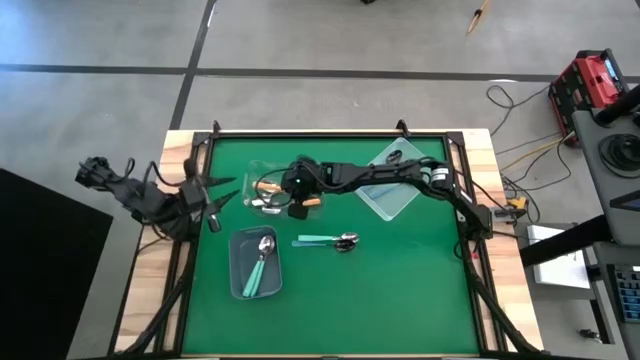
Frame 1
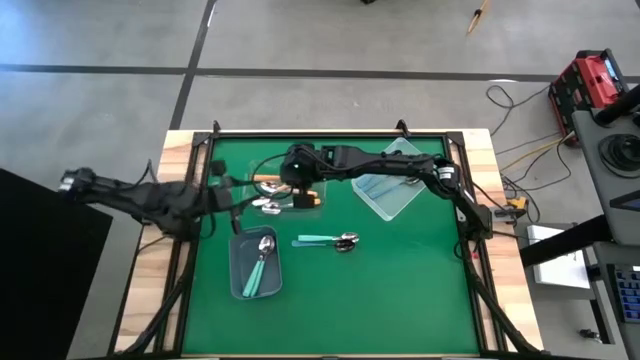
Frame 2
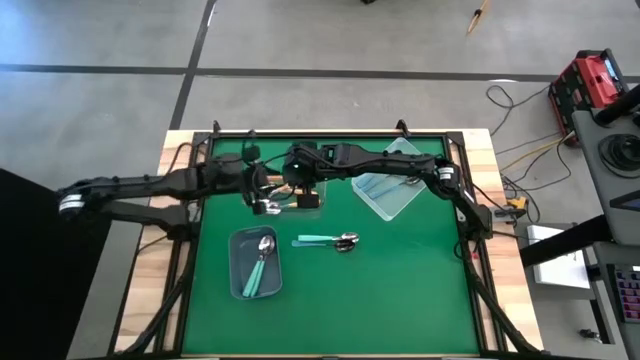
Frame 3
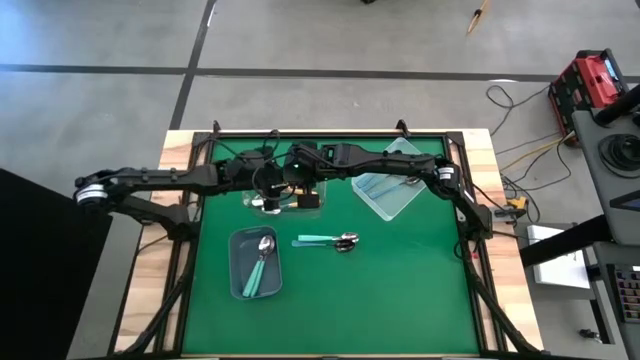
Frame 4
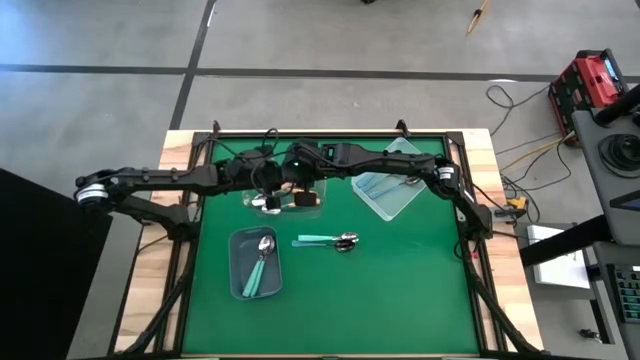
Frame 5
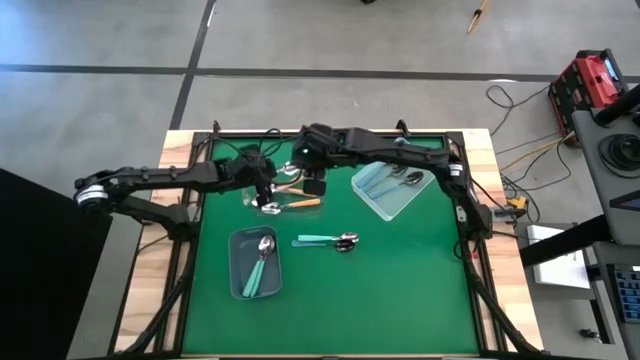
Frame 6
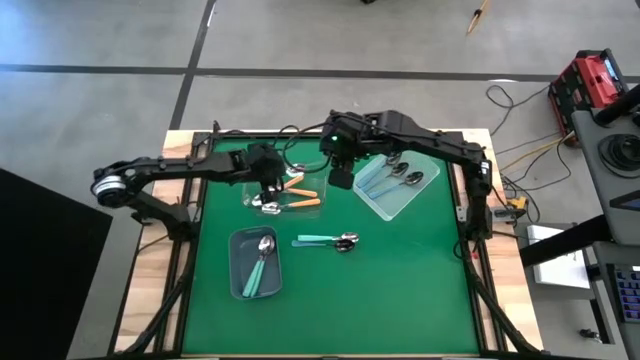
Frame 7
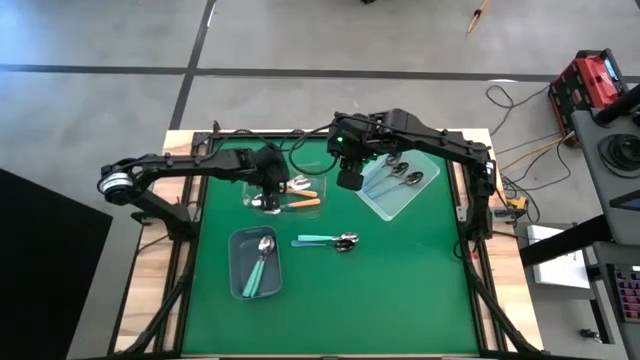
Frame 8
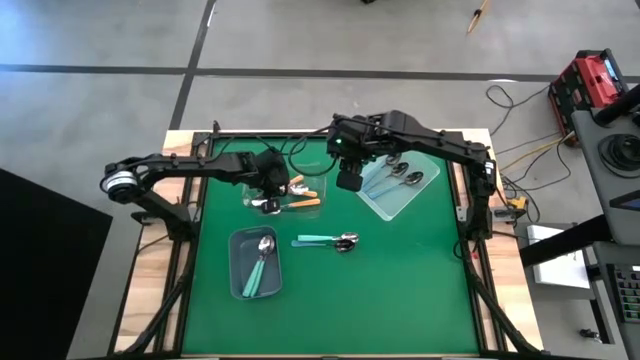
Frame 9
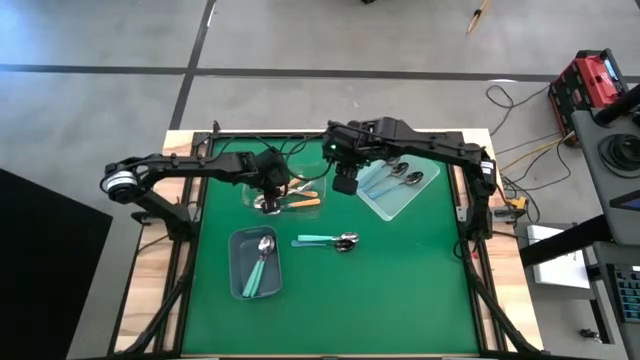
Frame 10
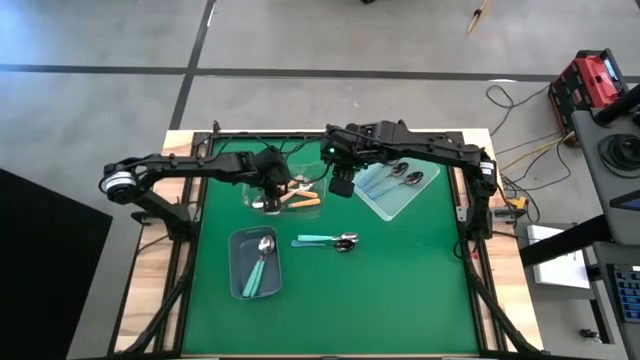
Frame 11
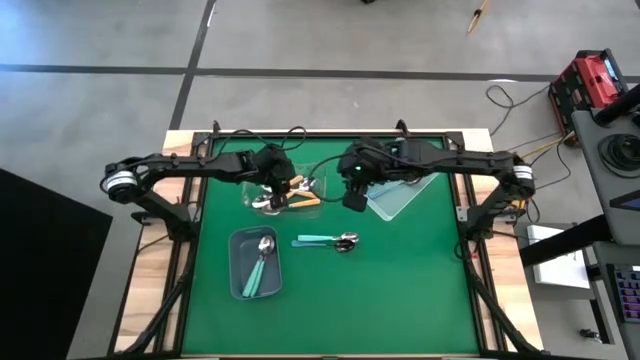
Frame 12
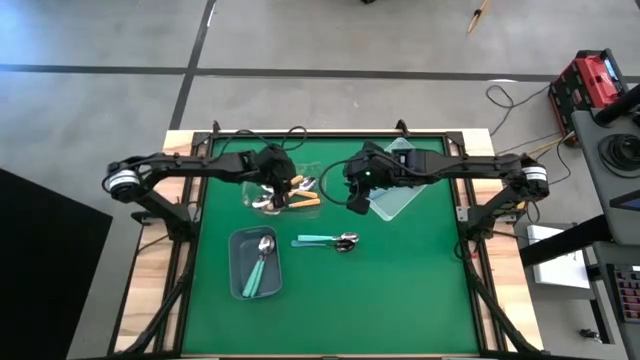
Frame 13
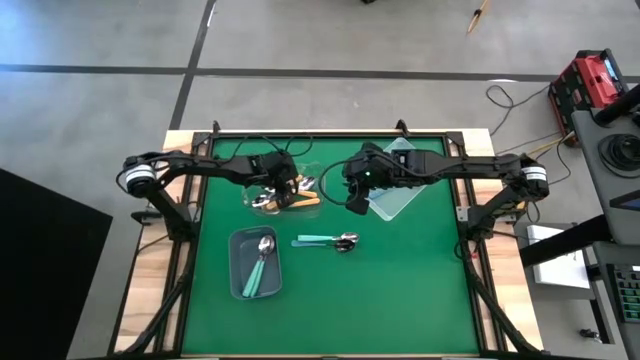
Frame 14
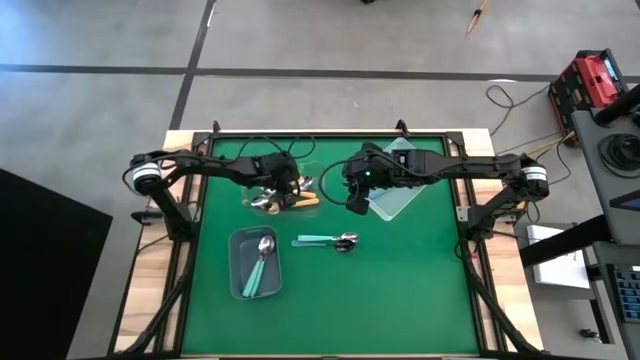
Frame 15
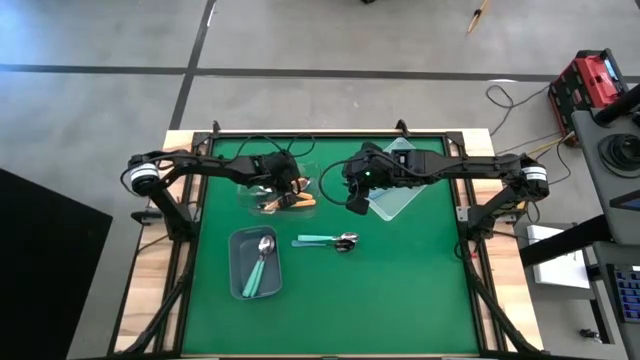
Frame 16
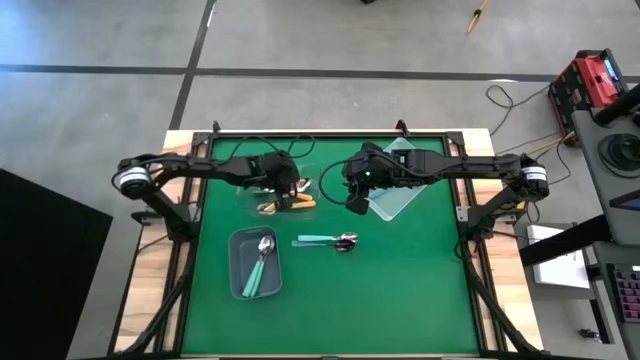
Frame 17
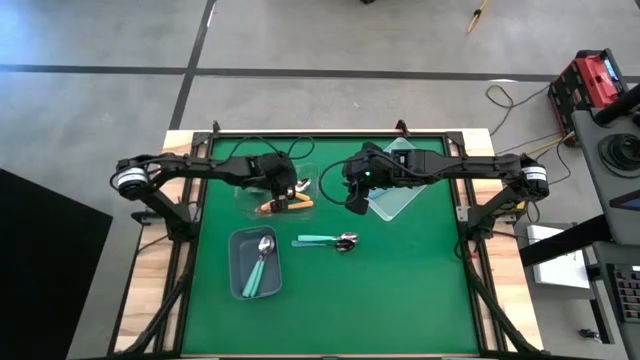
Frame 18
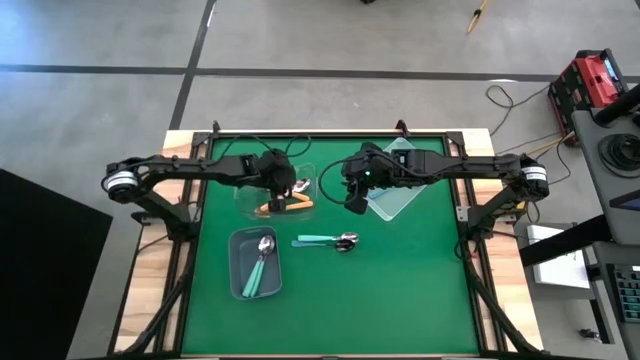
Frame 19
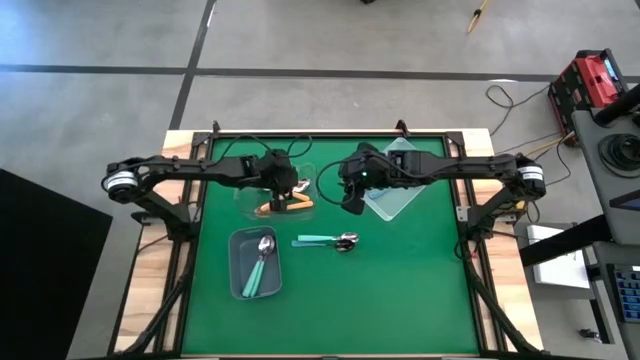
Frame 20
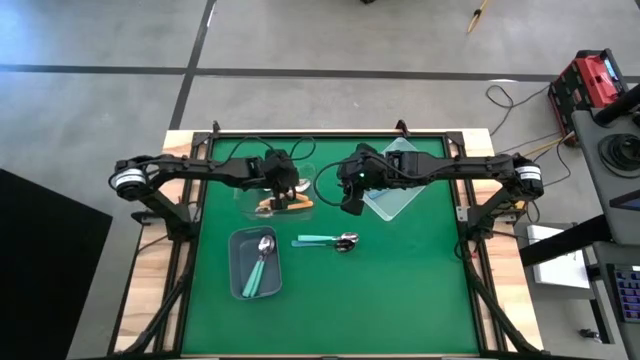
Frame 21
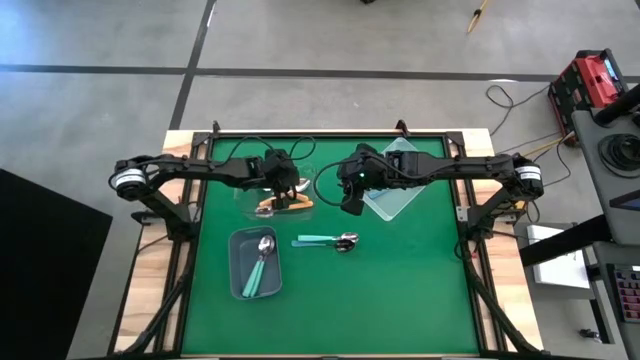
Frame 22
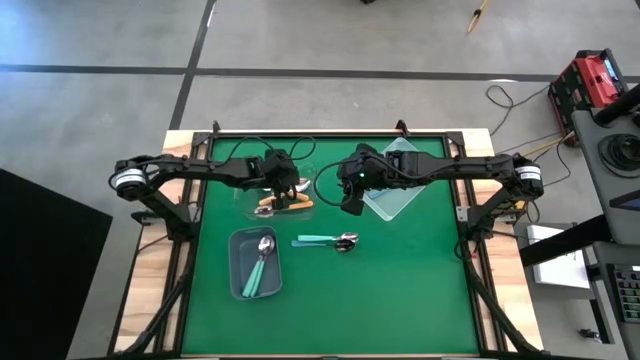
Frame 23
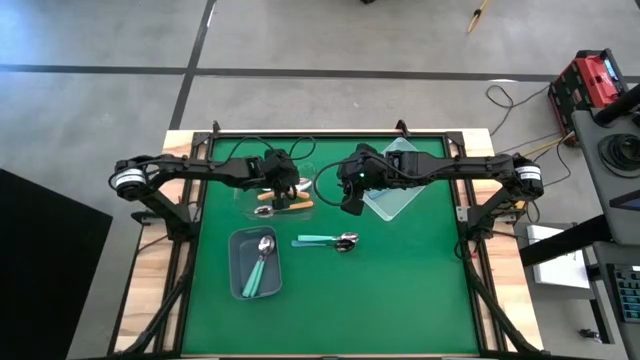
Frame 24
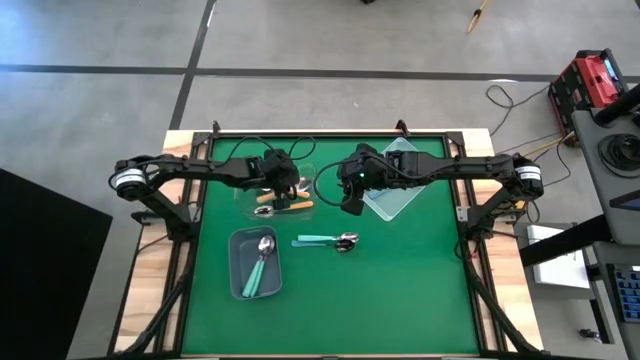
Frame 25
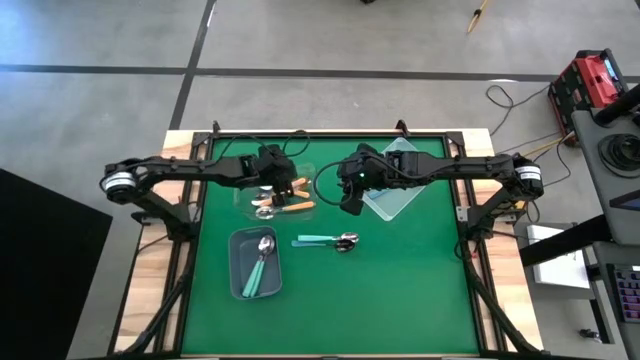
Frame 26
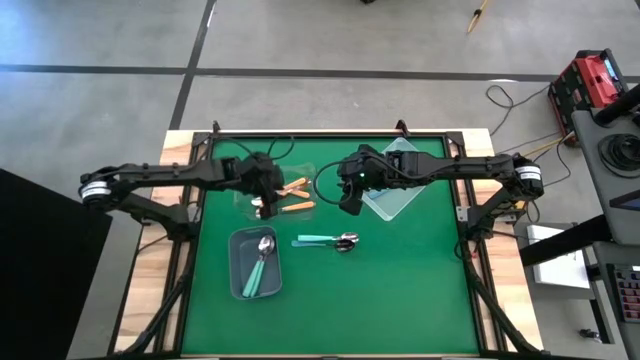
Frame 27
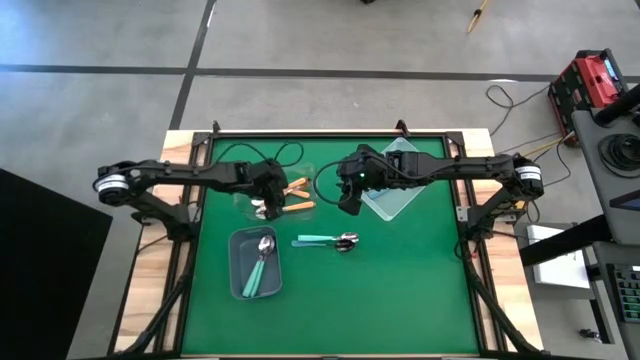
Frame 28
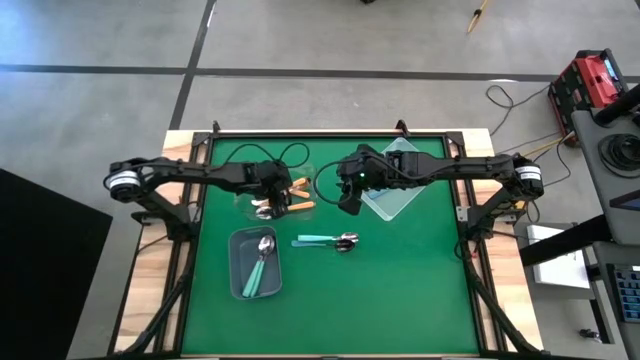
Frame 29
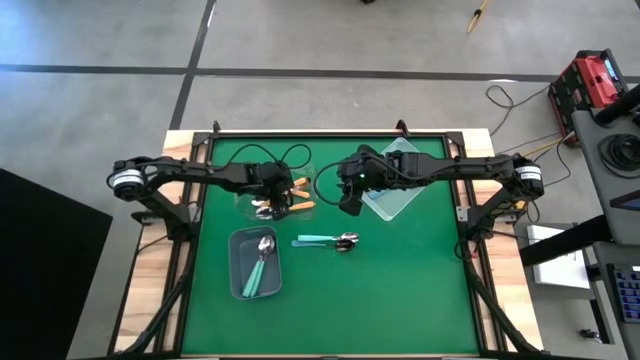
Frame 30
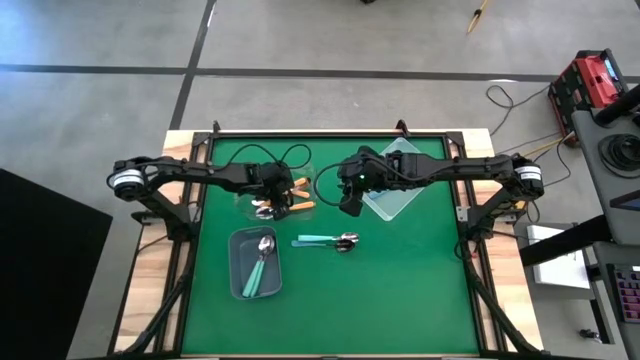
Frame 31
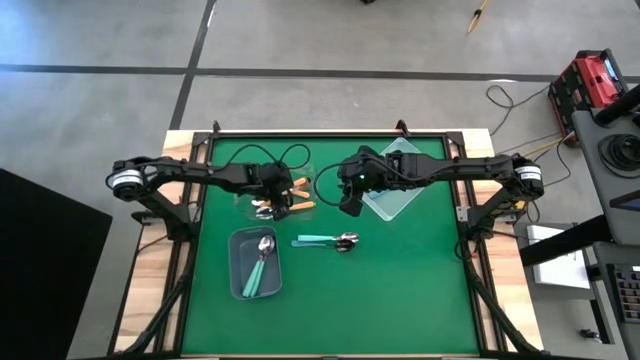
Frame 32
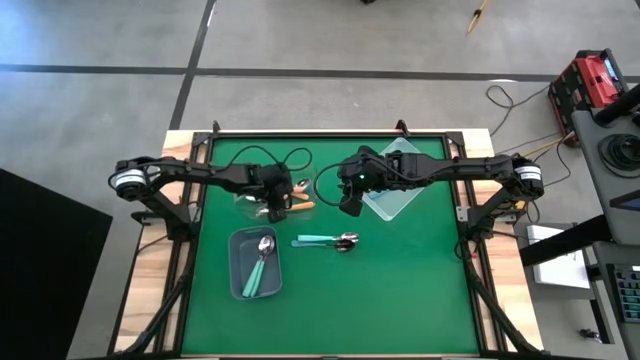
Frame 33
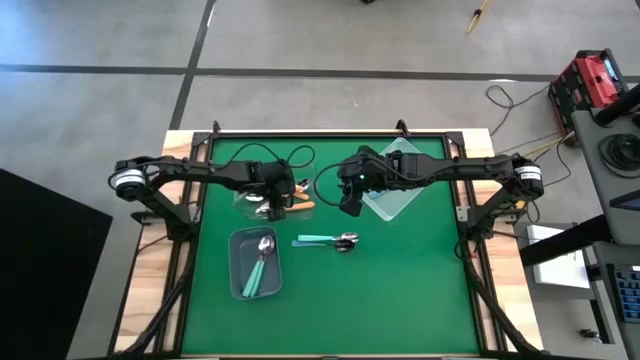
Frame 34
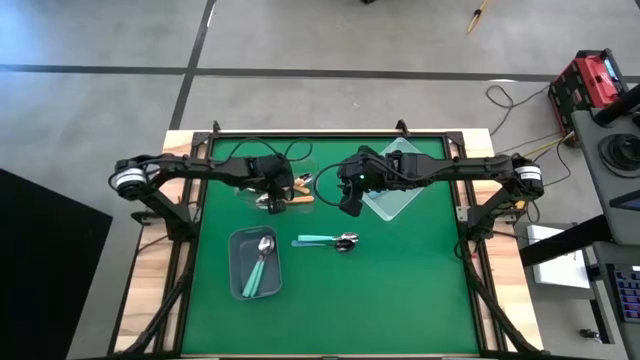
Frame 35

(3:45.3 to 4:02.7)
Task: Sort silverware by color (type)
Put the orange spoon into the transparent bin
